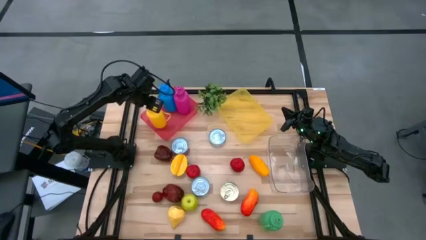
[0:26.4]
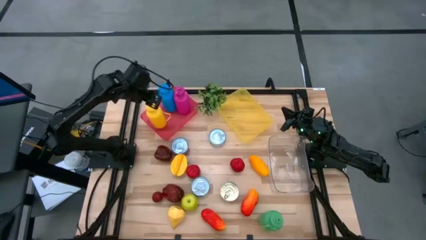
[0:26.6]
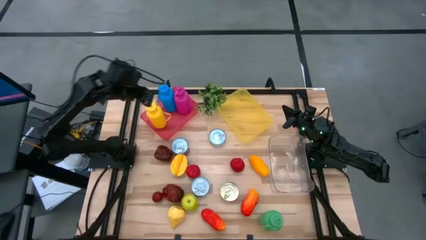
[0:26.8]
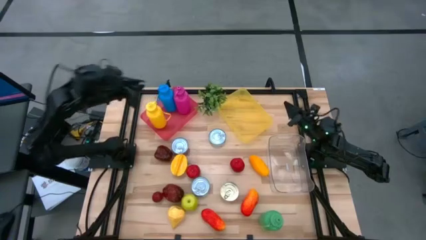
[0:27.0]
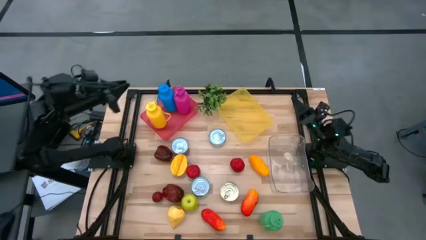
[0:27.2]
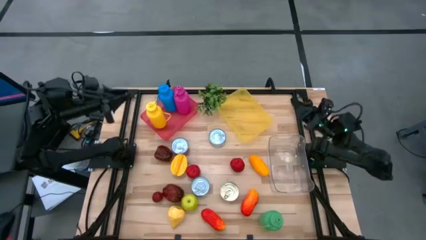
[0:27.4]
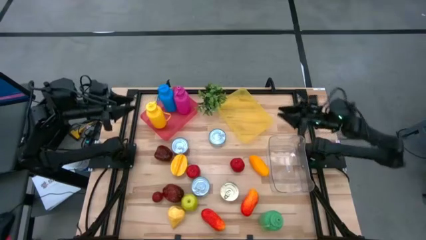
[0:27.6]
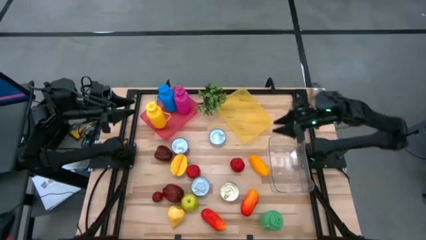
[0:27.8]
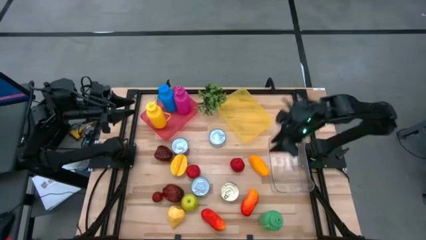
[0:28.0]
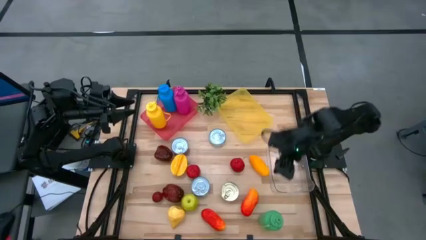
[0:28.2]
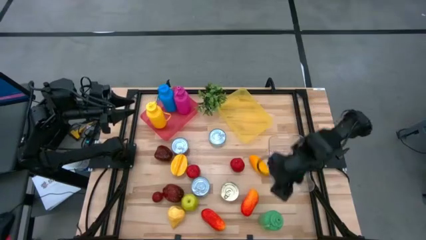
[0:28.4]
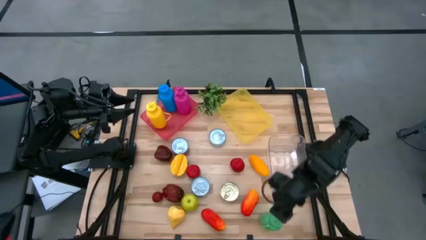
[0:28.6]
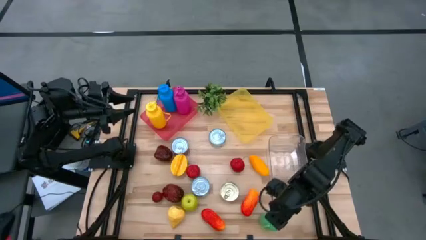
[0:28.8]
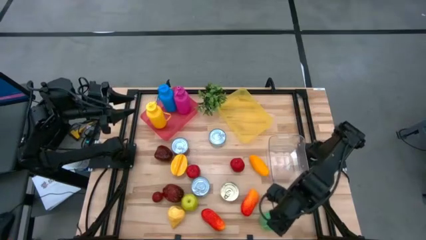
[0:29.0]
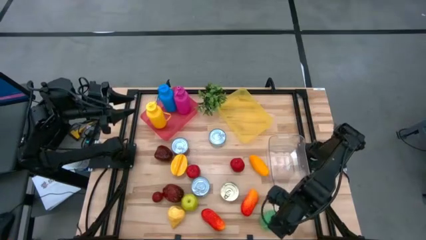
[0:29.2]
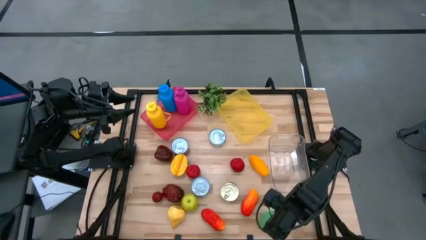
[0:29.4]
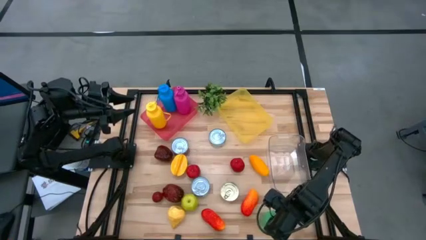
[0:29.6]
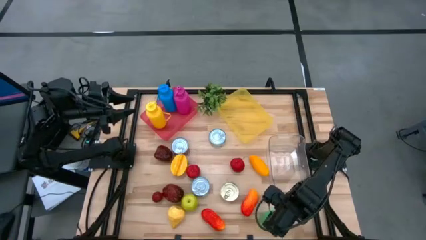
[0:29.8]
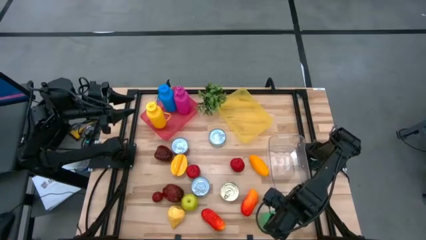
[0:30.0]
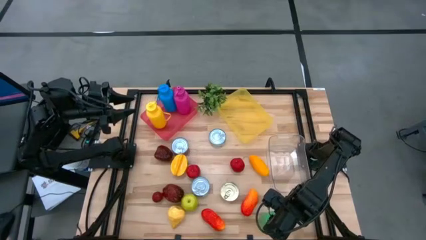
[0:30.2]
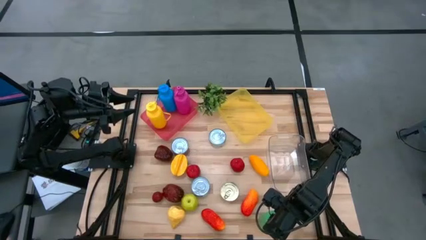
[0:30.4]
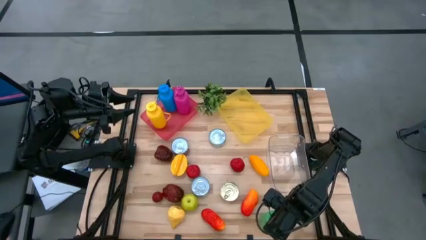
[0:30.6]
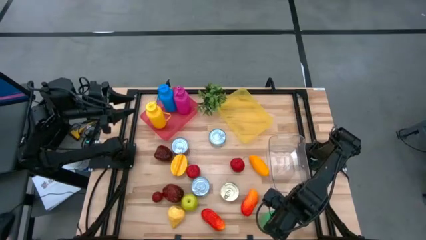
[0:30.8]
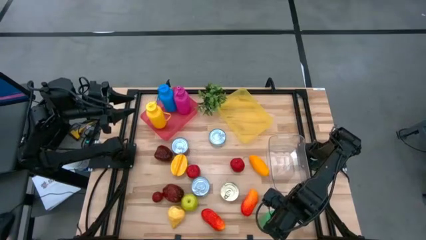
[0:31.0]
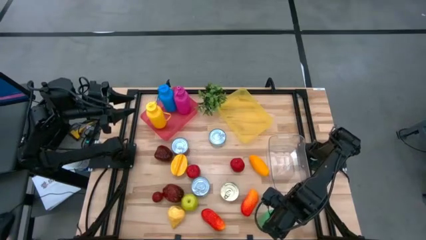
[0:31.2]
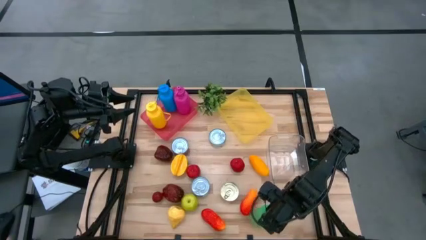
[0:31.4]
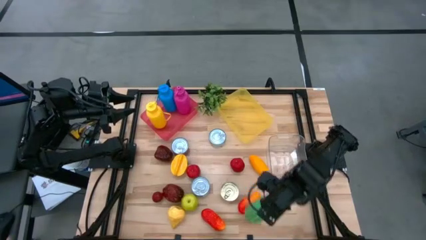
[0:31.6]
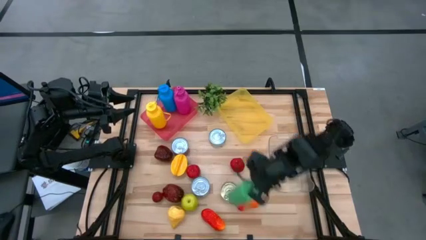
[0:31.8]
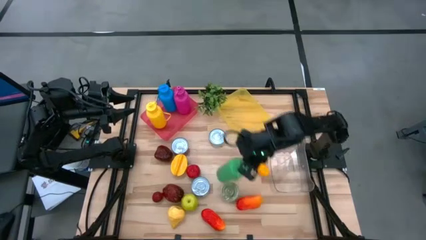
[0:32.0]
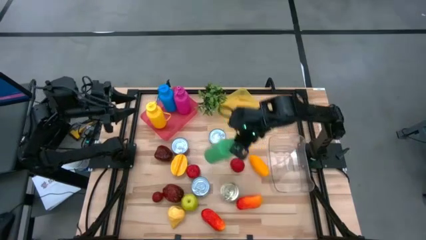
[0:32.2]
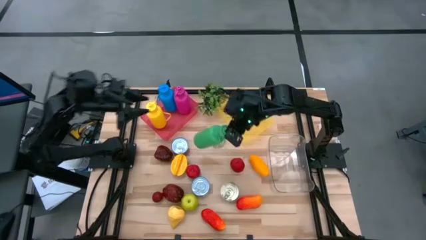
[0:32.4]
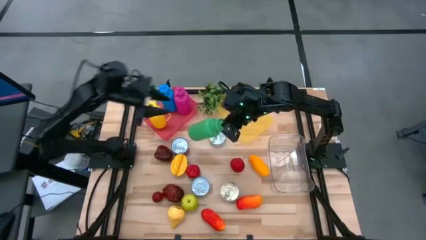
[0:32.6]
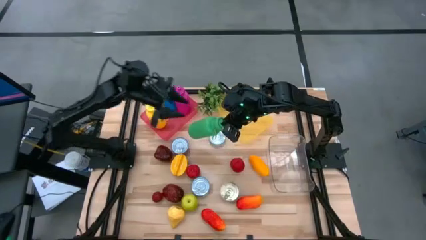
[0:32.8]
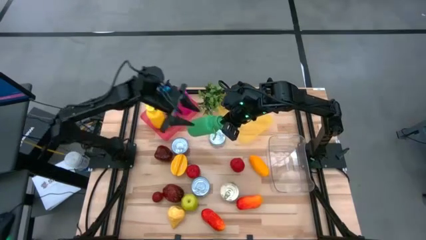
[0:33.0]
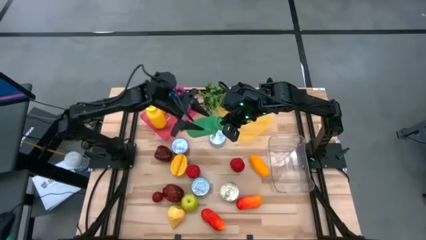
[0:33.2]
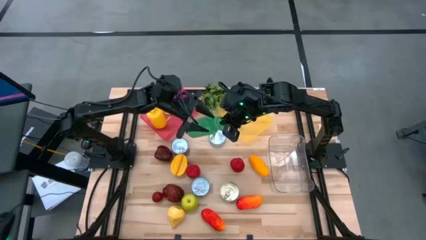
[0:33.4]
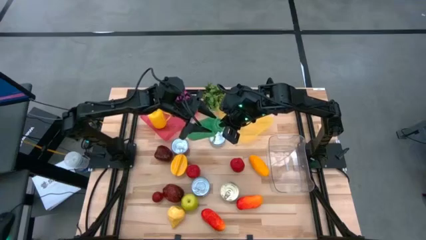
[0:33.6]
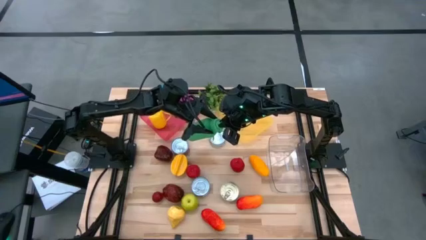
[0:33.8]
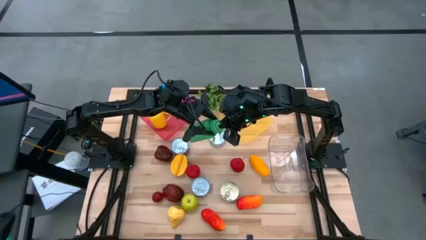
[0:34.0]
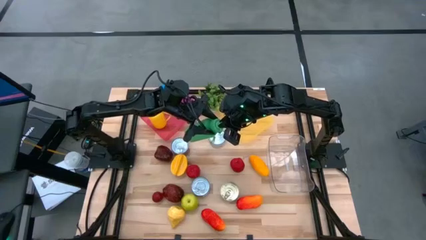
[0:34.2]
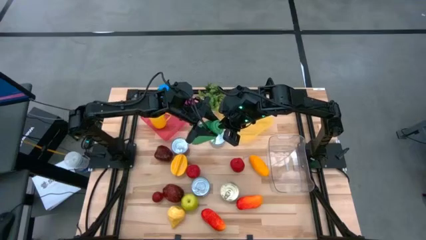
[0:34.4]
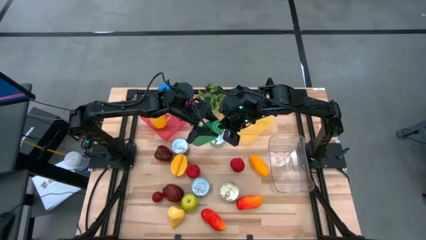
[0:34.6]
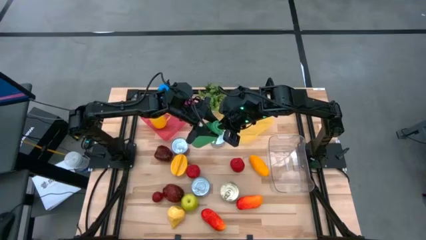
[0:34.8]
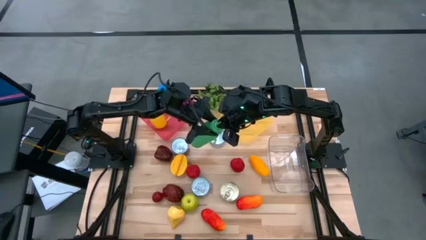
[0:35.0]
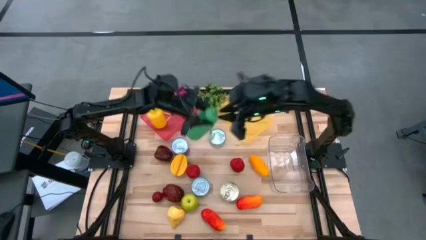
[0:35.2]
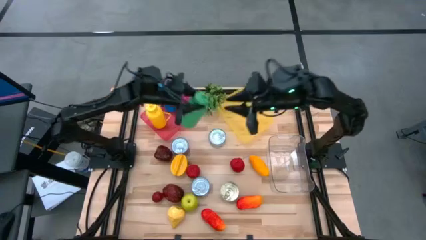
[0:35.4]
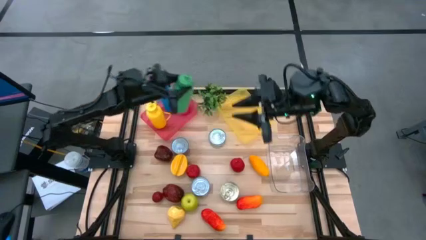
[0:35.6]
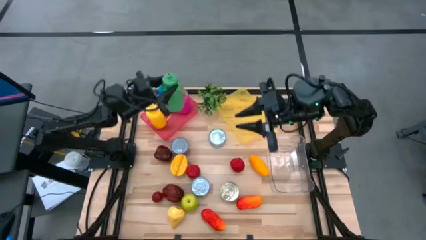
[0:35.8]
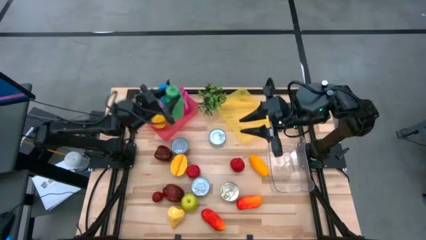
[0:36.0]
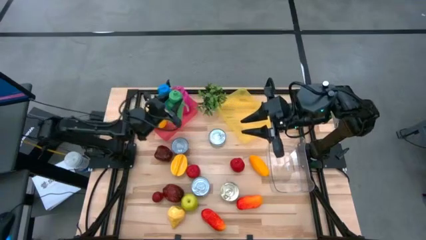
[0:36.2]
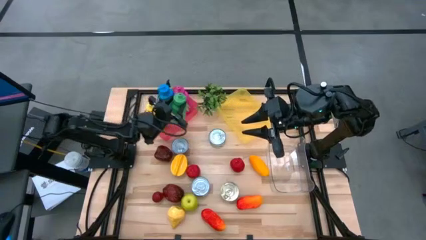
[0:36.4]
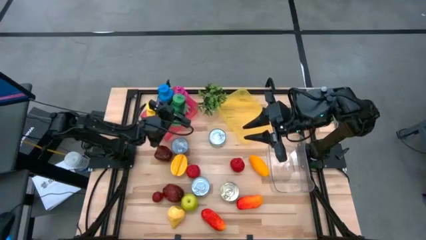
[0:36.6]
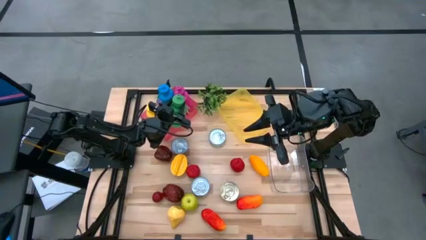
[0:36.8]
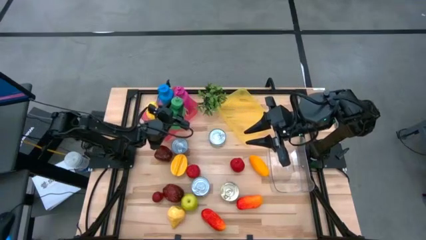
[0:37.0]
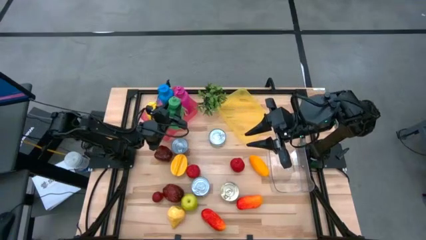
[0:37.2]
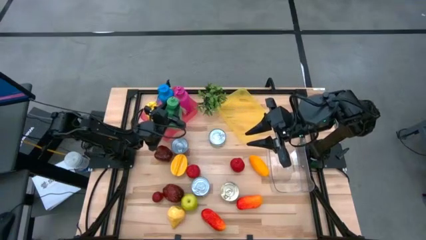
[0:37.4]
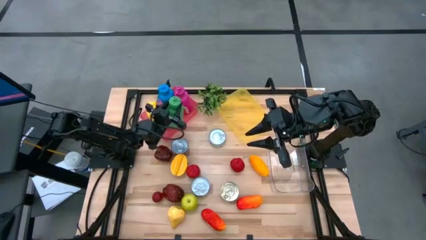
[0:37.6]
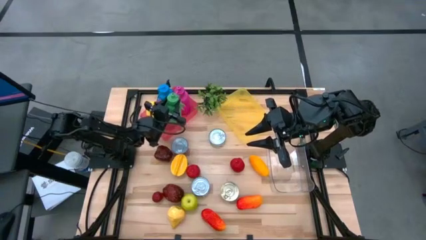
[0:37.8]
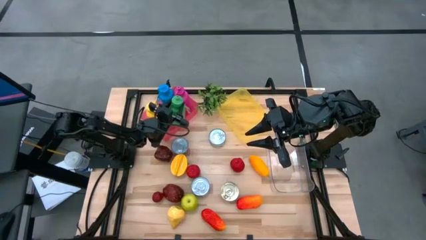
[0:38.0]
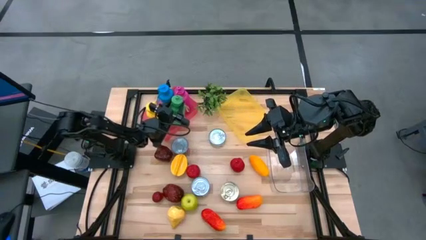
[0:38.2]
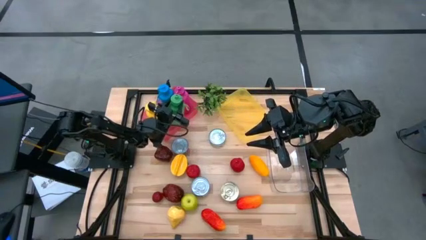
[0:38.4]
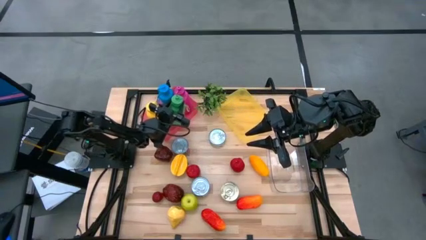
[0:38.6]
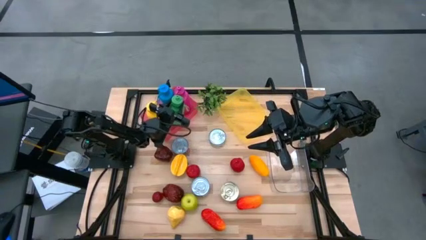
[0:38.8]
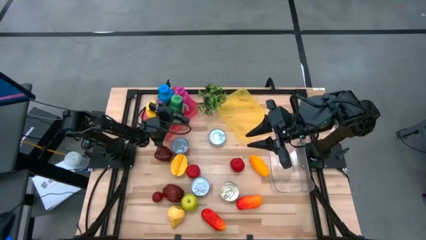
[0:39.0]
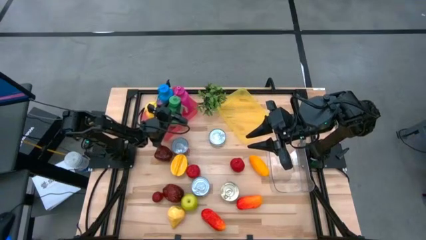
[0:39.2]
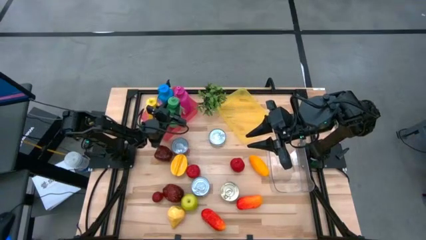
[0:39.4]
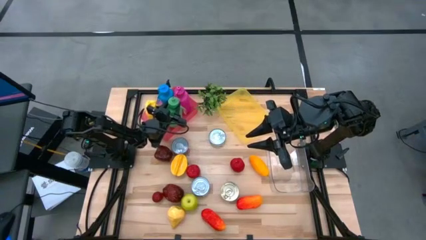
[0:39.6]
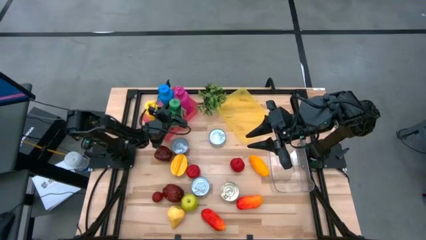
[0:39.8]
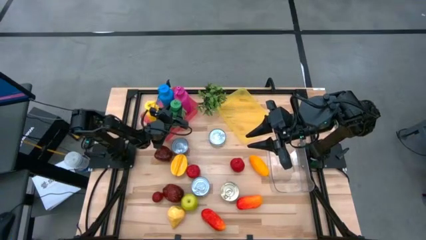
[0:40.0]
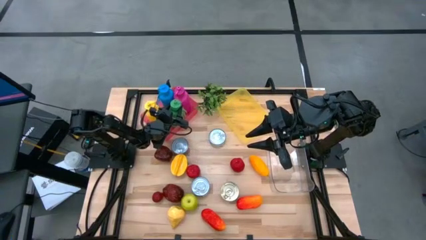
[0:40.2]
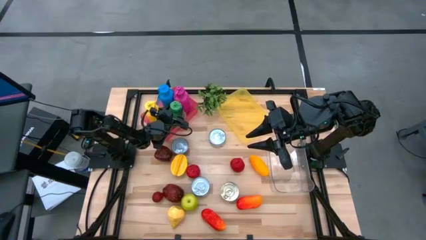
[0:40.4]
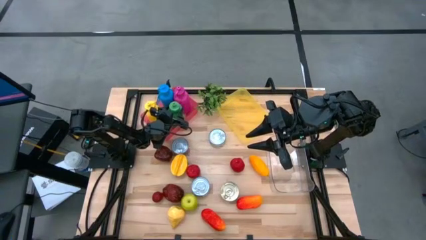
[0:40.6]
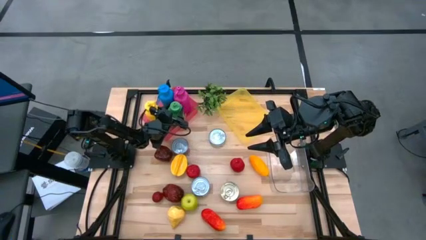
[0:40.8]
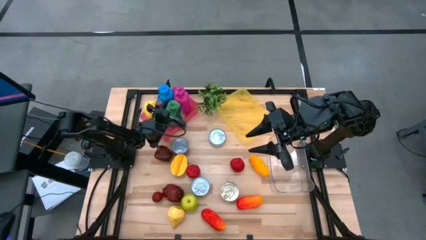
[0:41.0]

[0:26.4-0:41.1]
Task: Pick & Place Food Item
Put the green water bottle into the pink bin
